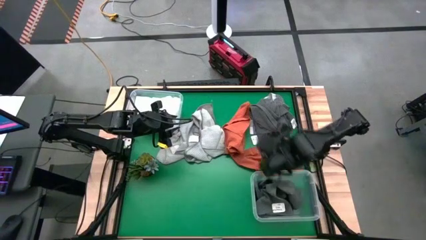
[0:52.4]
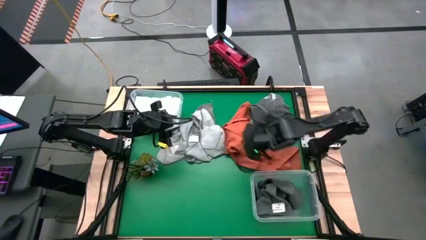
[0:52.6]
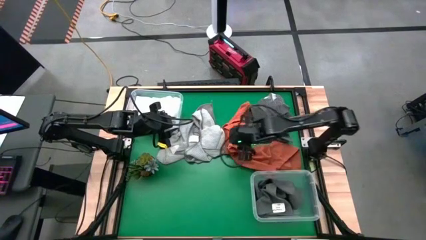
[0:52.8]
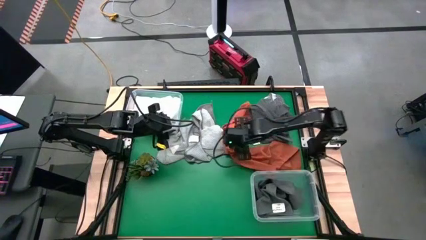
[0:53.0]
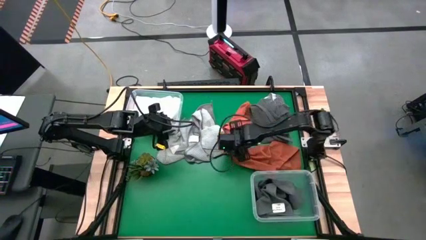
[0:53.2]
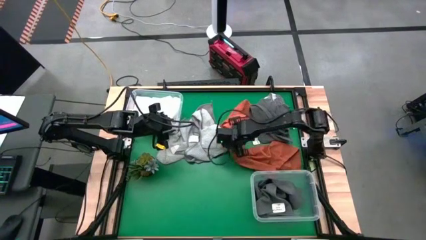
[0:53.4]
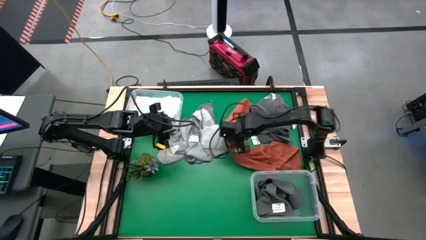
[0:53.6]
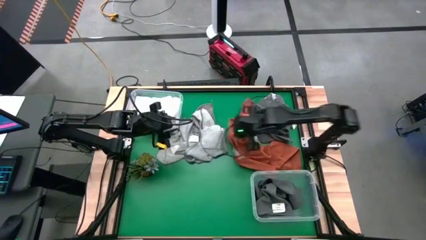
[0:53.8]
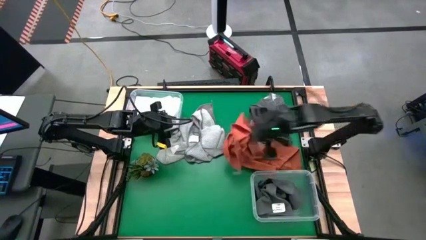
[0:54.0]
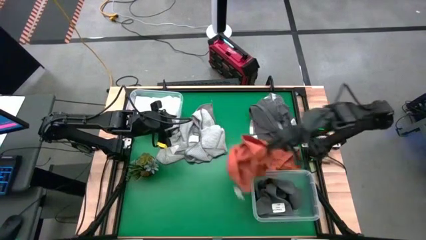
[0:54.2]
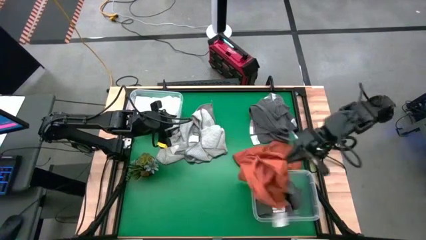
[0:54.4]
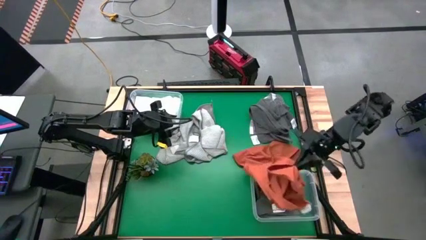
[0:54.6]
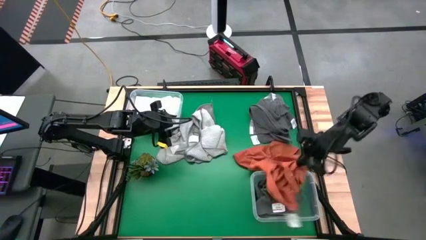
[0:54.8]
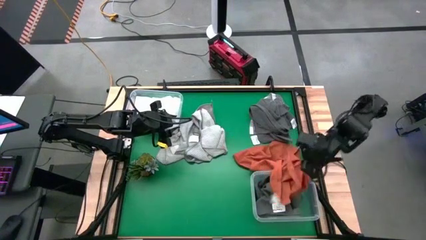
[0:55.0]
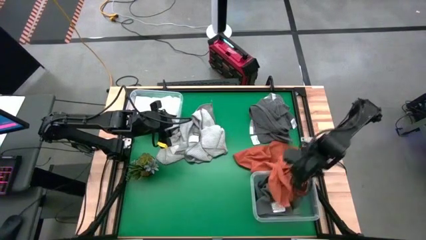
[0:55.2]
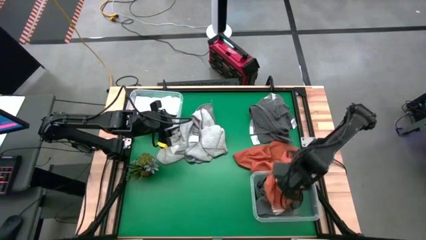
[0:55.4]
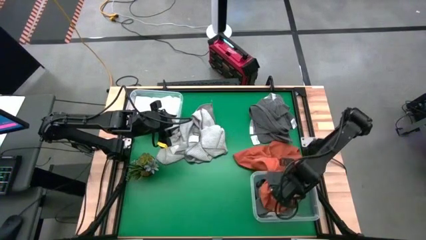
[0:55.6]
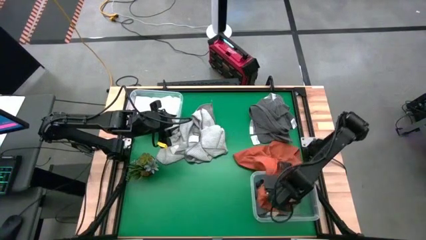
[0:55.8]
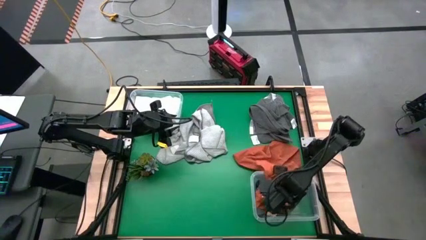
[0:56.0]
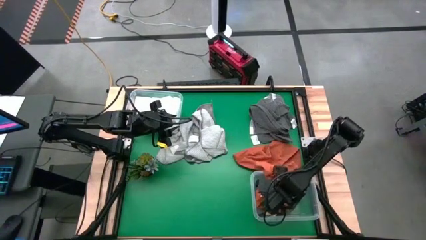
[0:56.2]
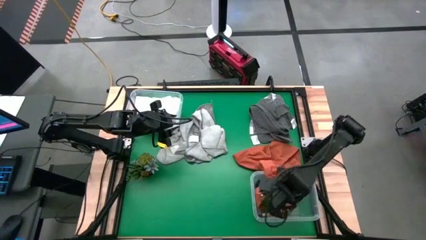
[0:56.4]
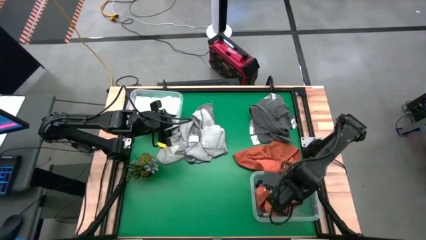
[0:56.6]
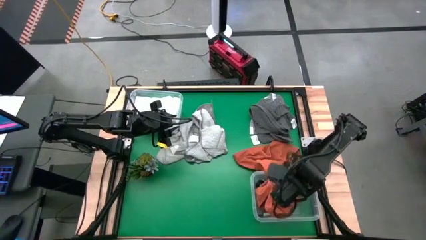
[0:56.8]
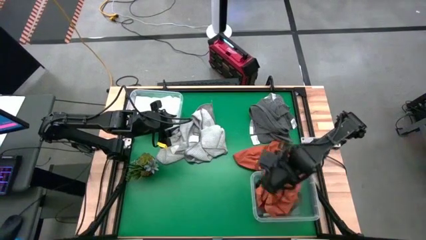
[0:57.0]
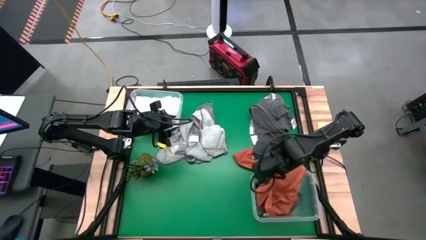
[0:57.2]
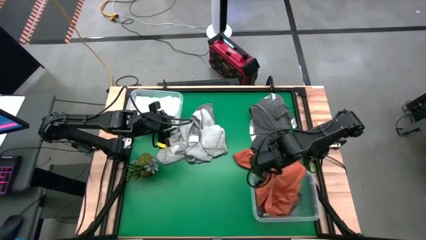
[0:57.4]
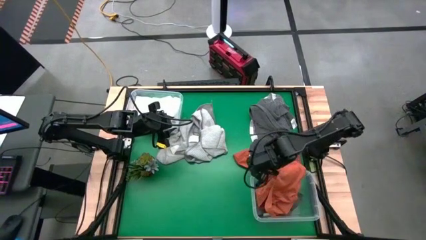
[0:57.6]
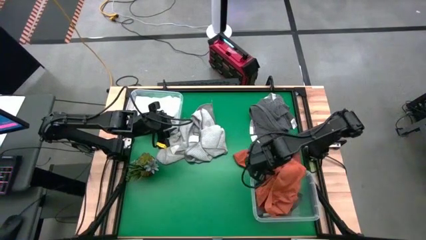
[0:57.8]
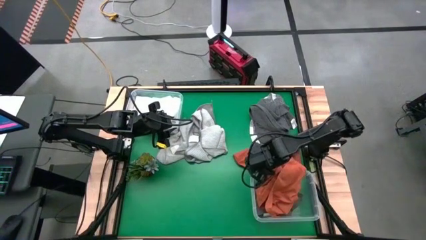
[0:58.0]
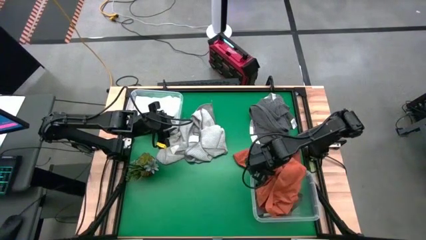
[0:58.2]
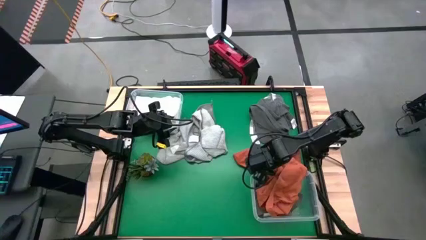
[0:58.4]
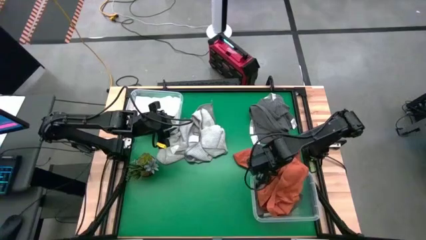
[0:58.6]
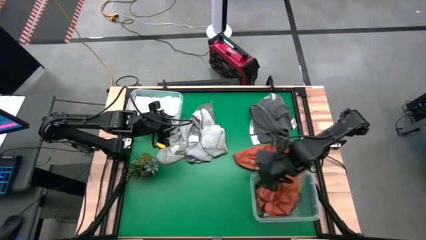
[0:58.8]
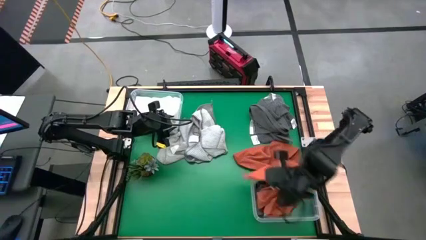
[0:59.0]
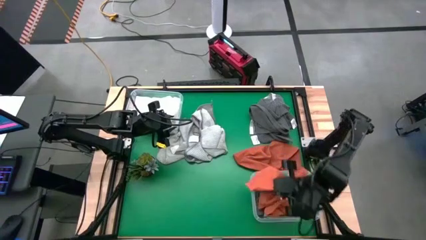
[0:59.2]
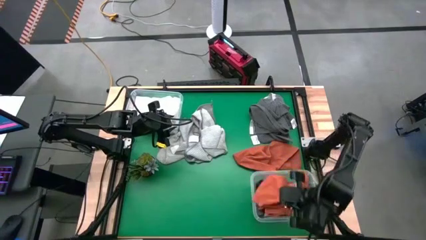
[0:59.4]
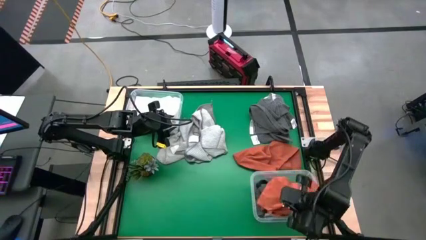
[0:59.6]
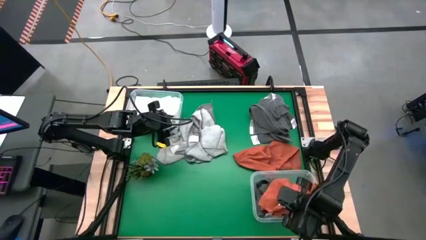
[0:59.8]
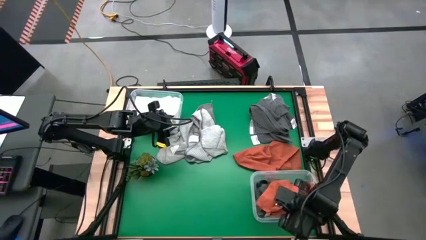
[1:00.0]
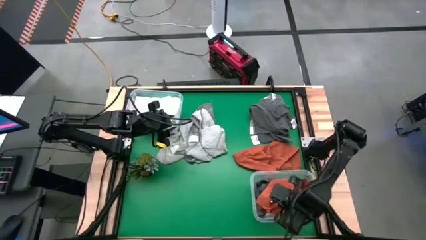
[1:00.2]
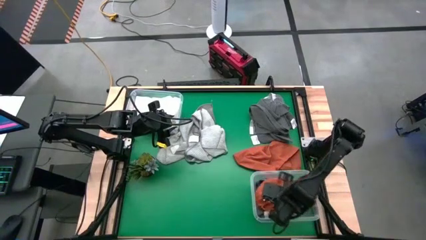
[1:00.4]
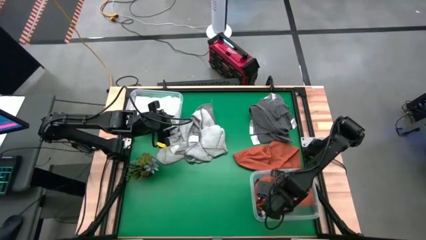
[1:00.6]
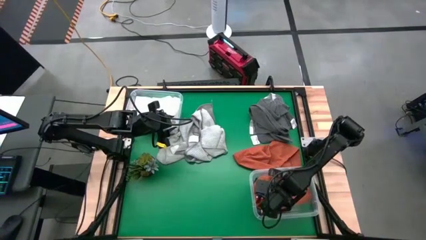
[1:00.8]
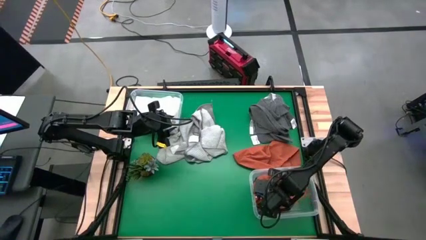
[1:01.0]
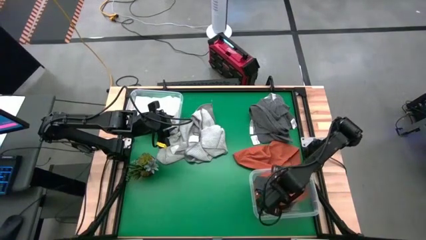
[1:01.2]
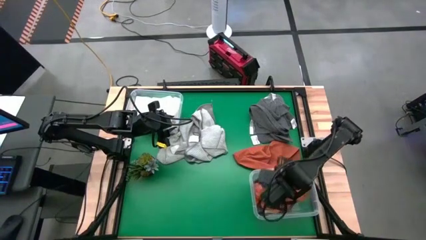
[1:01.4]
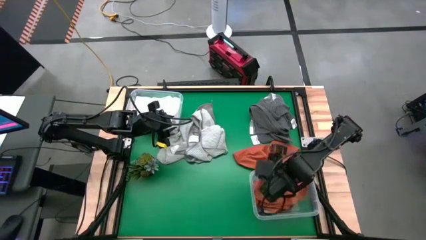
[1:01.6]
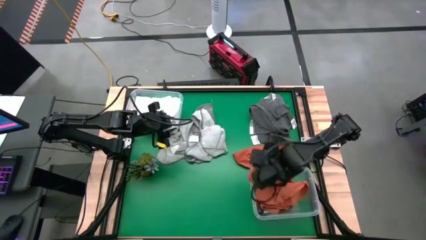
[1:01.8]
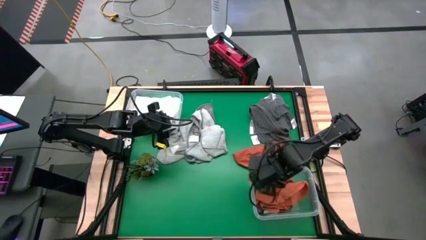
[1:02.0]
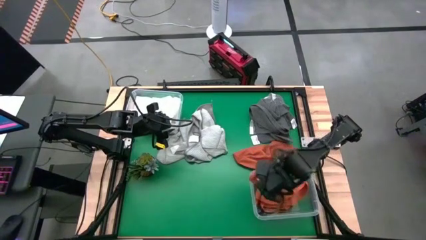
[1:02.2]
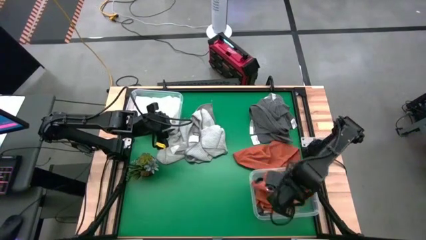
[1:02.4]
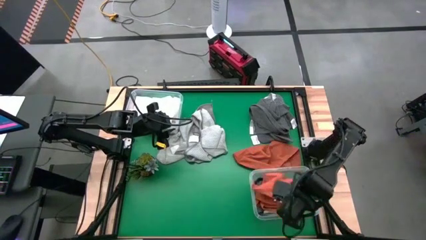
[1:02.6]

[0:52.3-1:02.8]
Task: Sort towels by color in basket
Put the orange towel into the bottom transparent bin

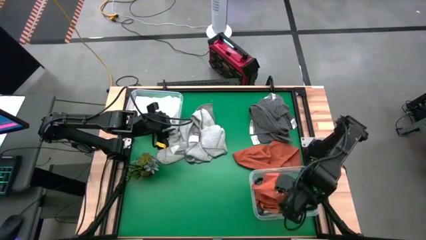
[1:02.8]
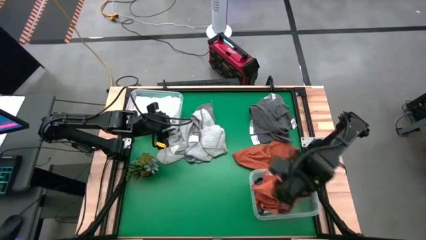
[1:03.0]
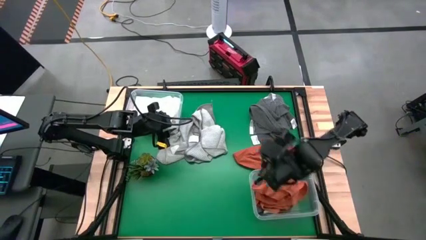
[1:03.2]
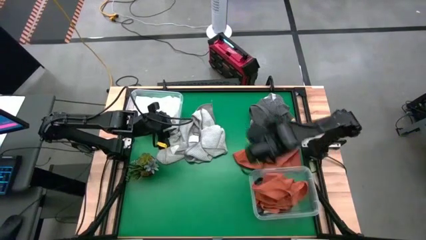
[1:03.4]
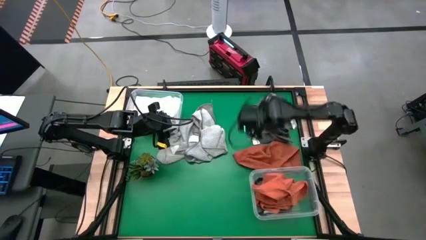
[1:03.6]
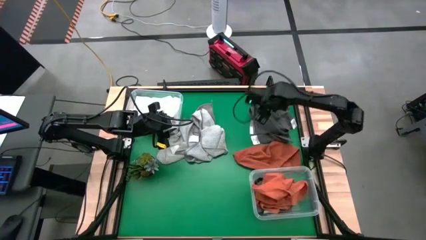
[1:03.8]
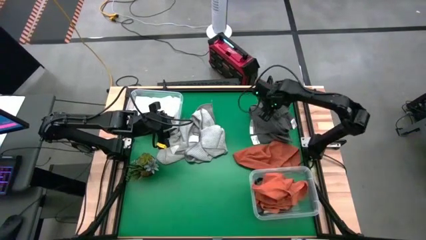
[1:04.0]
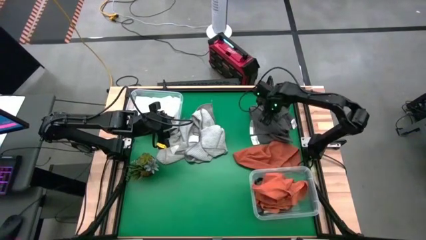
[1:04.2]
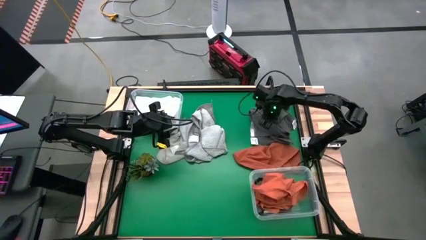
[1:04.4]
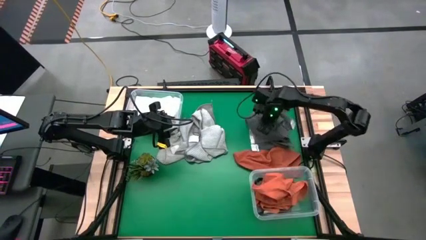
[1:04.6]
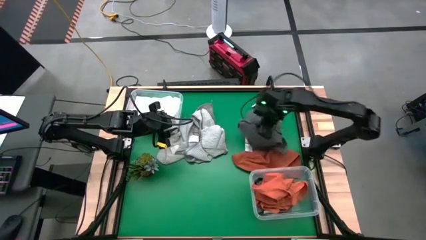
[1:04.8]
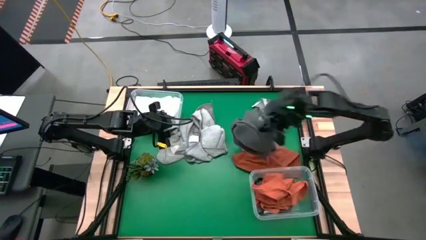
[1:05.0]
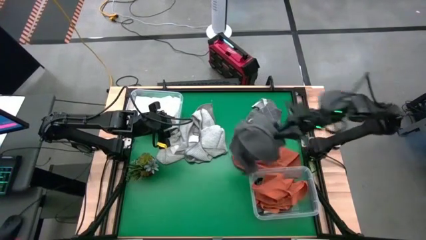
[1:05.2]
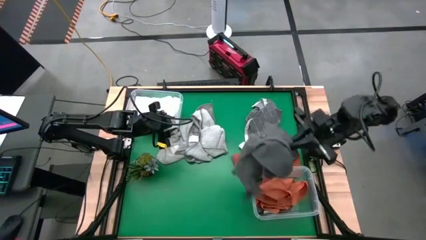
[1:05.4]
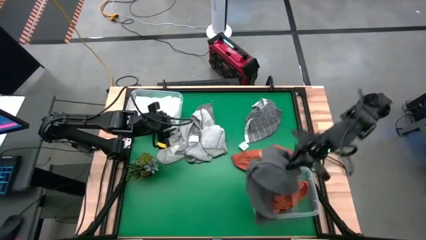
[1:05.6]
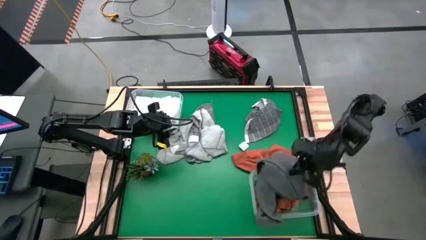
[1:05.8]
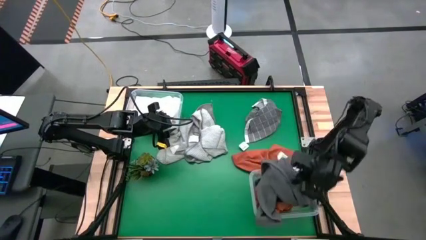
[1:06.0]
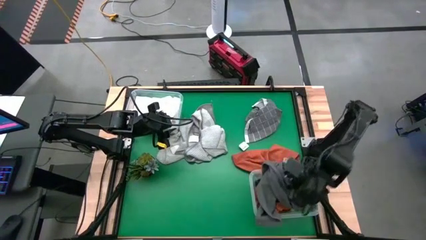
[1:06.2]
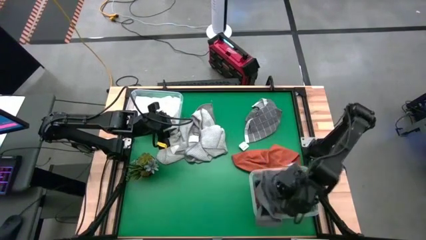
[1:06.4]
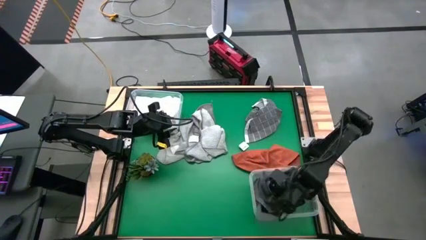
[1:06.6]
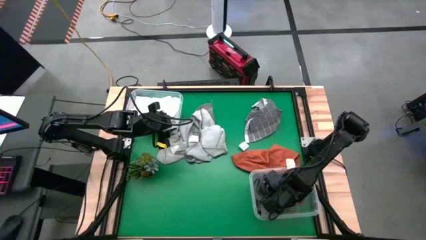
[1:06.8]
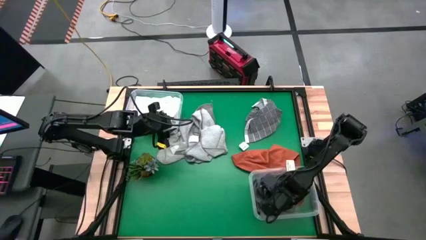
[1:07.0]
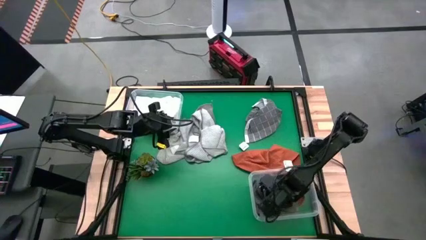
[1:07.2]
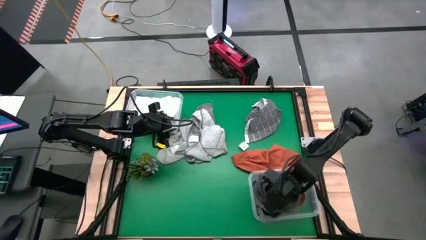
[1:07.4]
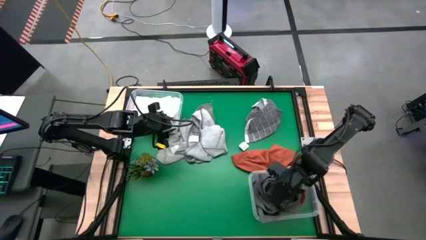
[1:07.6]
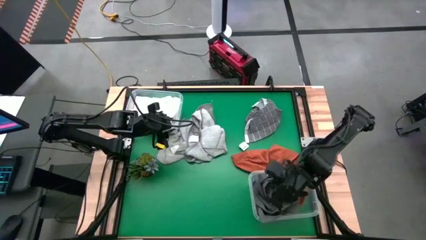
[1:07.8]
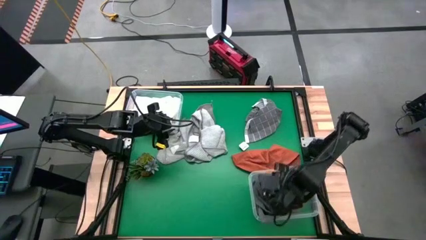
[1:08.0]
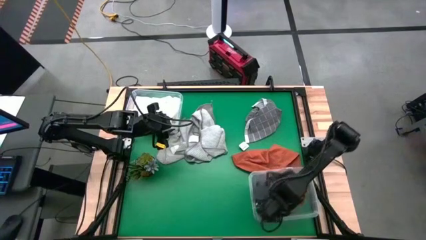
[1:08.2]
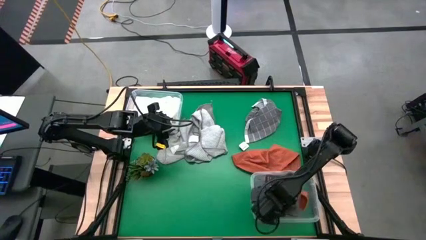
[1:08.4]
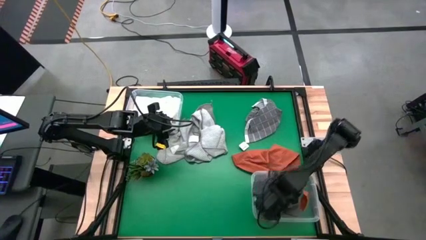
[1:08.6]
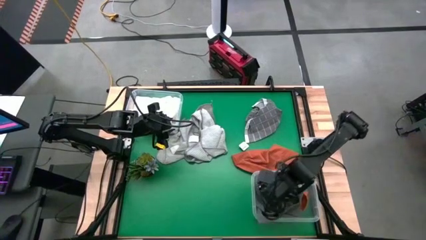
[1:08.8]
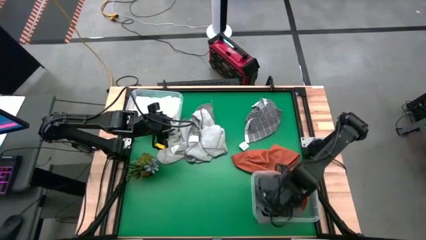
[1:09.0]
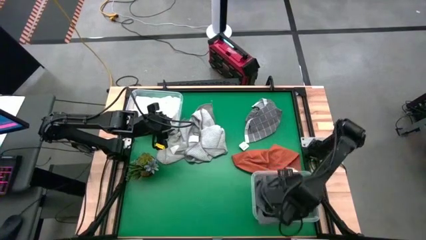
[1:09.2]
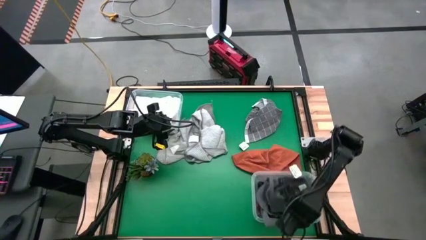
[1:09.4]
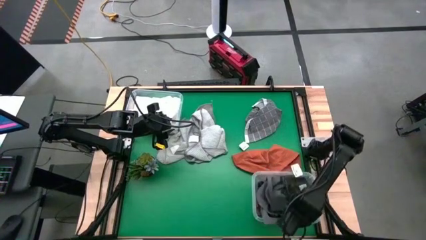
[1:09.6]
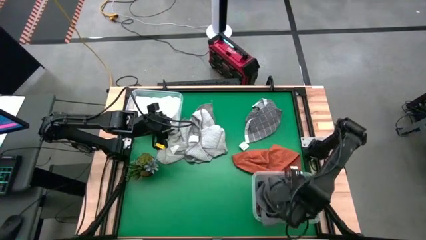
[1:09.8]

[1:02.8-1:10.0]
Put the dark gray towel into the bottom transparent bin
